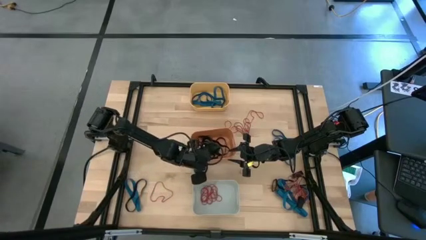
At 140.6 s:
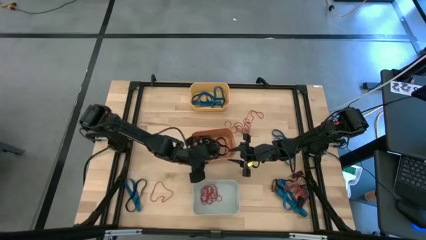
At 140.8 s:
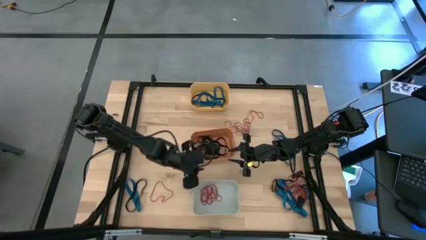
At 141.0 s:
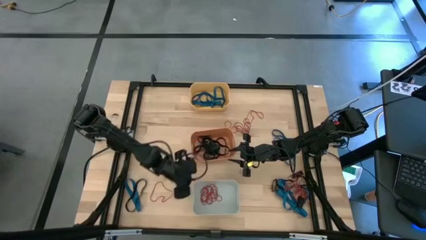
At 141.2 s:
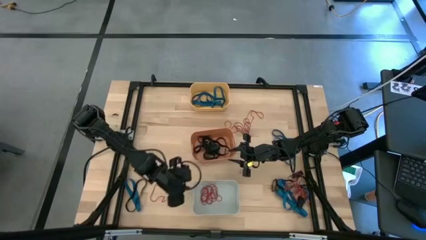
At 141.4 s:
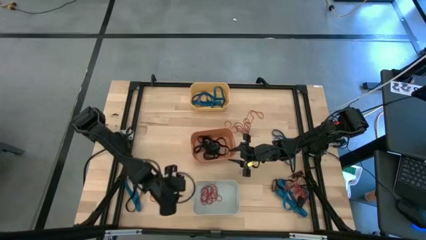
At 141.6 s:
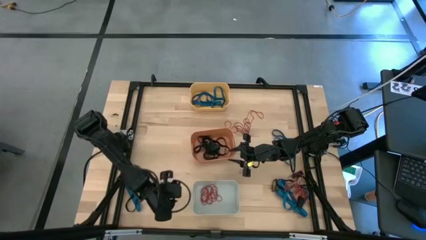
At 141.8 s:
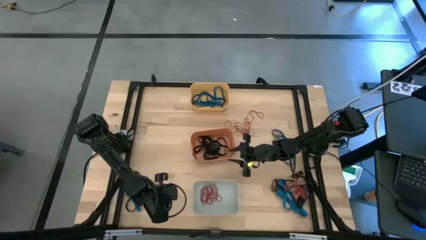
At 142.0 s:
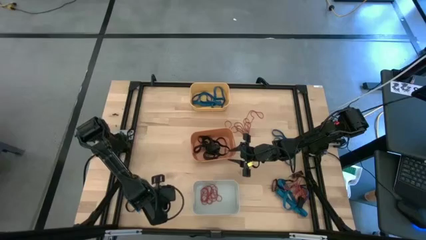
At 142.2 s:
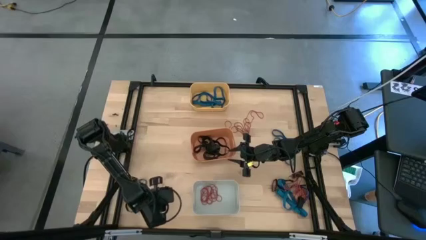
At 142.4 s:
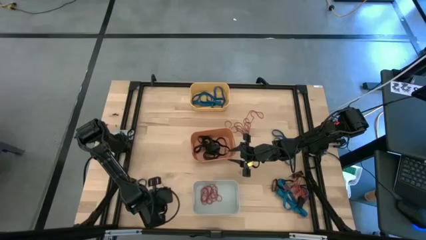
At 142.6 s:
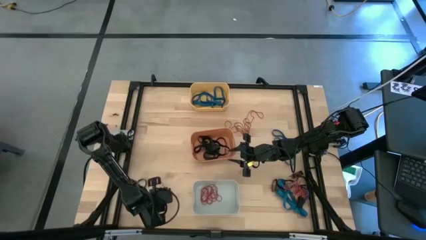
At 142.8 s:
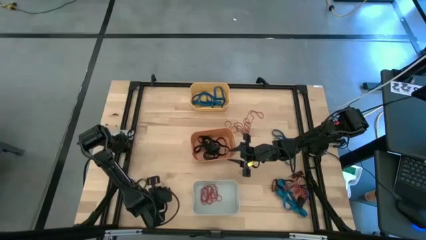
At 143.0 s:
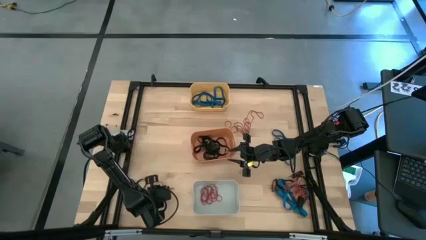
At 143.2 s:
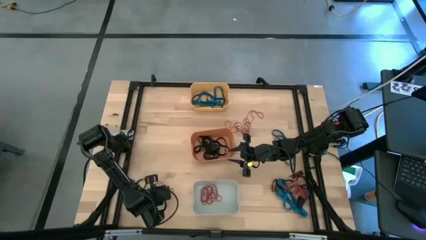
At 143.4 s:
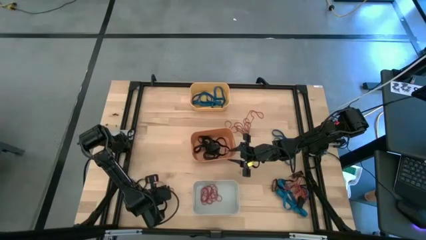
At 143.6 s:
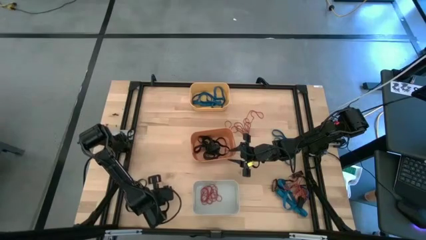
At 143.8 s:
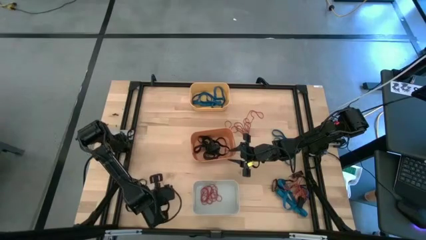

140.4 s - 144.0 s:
Task: Sort rubber bands into baskets
Put the red rubber band in the white bin

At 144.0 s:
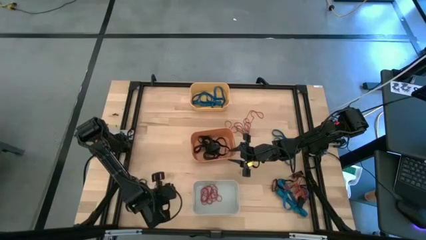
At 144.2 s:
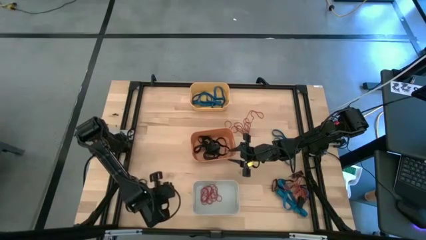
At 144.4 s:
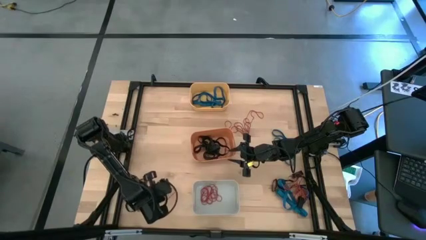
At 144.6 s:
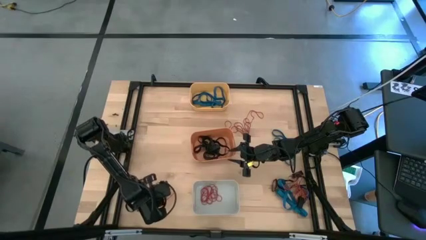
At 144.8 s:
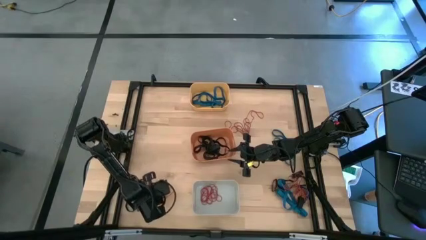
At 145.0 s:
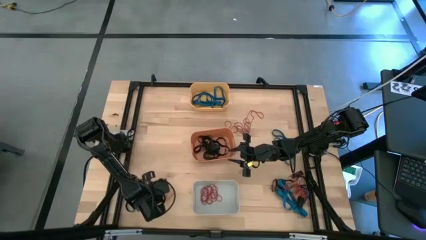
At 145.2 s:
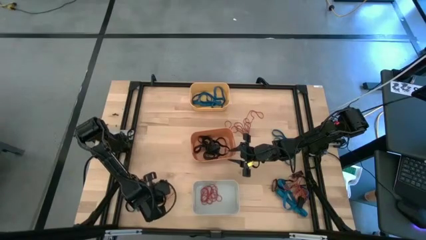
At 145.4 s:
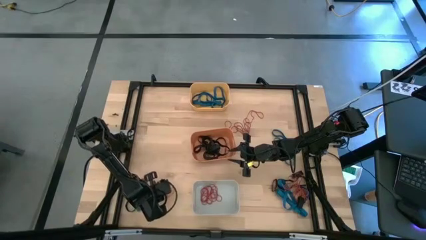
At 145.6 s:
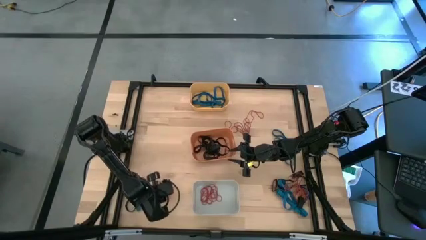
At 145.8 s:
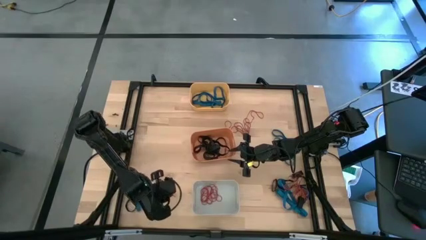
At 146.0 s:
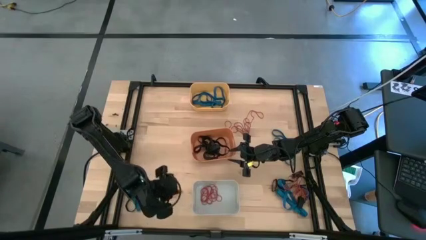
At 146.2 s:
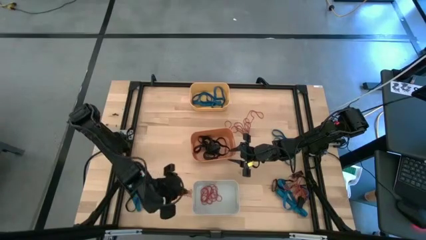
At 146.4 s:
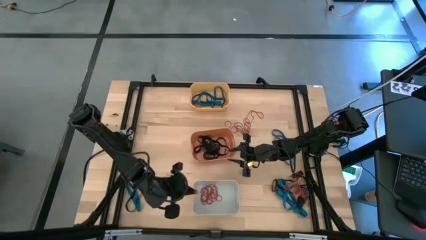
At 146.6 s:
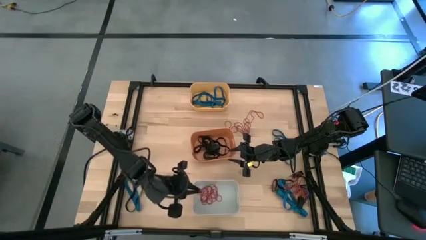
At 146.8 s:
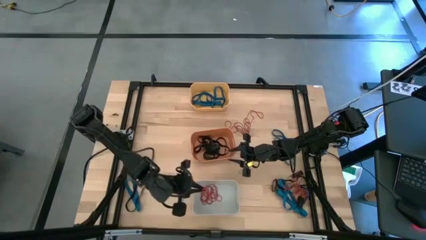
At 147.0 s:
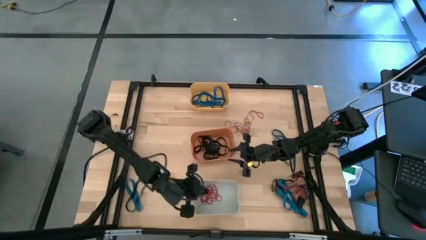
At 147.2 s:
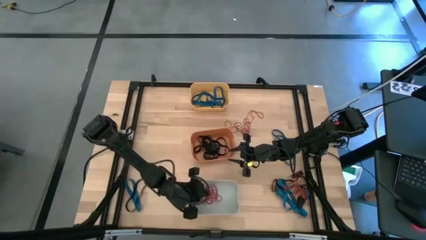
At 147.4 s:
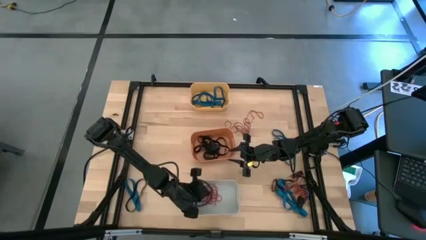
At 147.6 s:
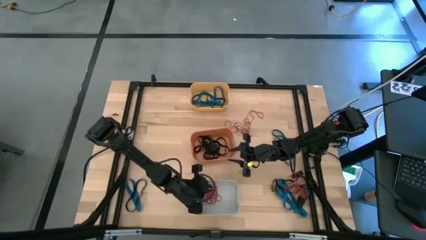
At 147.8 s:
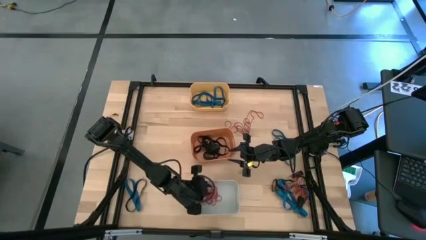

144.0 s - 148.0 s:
Put the red rubber band in the white bin

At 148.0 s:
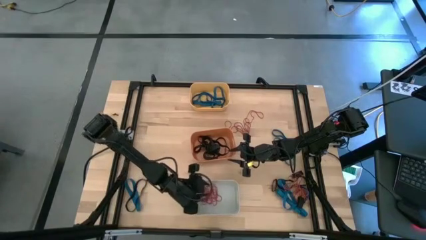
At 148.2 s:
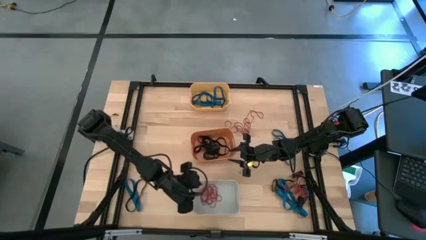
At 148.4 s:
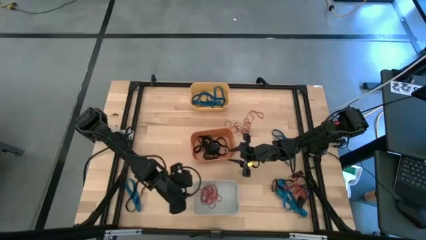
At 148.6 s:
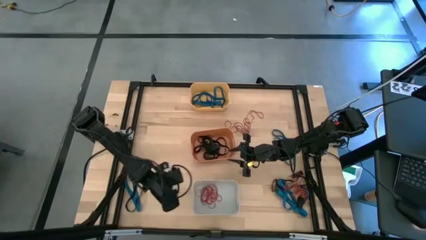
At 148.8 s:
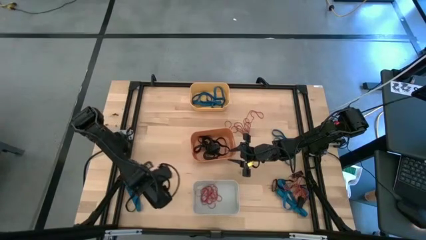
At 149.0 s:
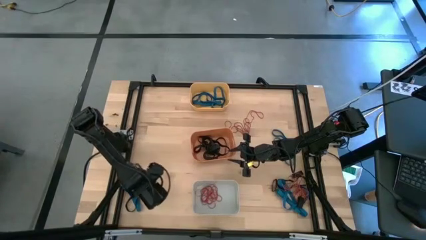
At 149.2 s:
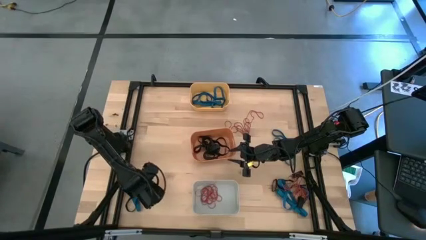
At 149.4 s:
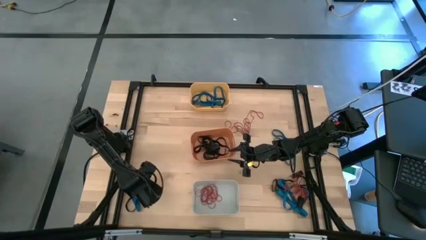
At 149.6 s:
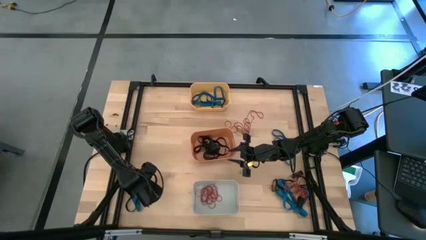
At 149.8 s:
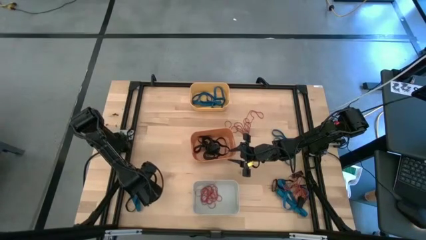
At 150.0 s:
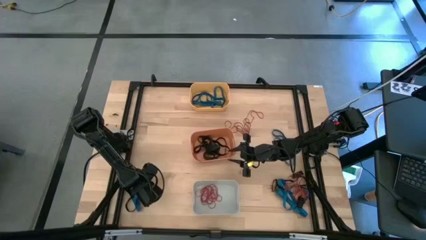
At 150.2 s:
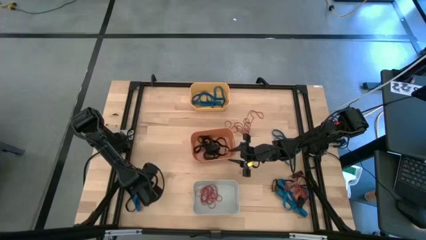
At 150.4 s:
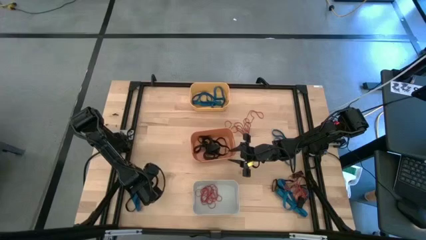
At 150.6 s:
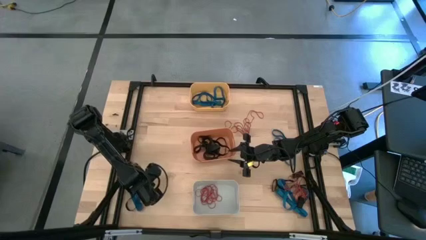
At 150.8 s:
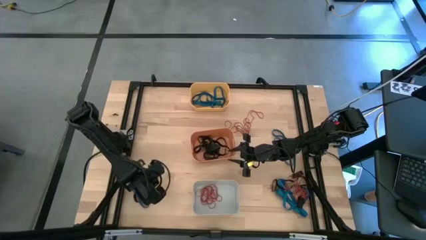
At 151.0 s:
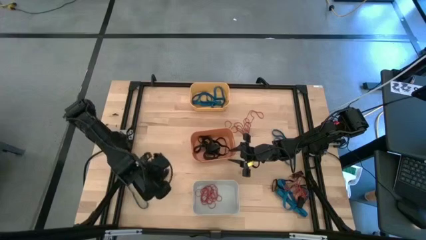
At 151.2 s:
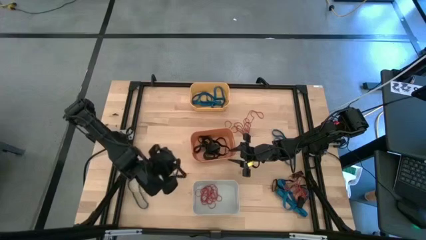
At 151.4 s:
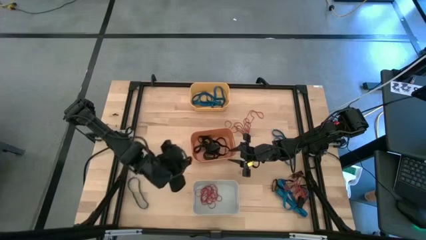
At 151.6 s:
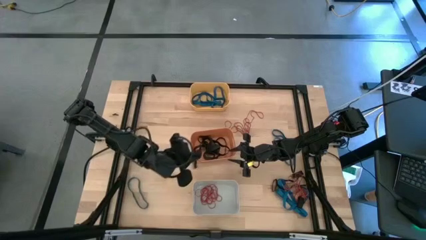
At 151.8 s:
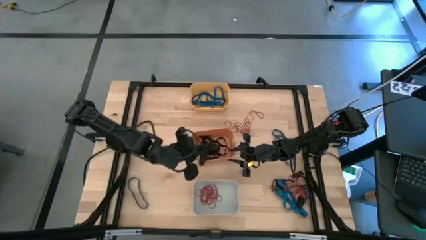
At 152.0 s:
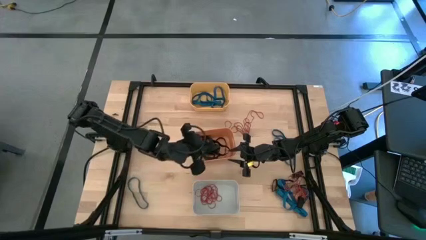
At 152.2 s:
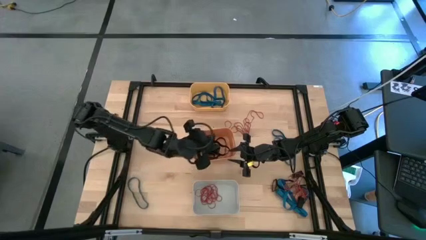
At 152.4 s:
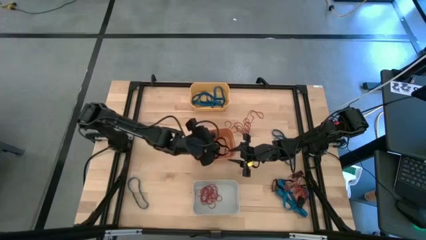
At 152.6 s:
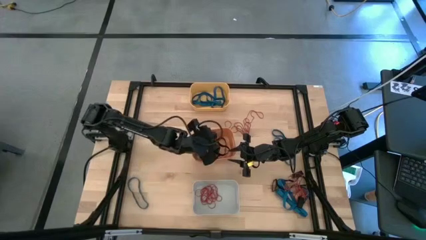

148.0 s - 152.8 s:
Put the black rubber band in the orange bin

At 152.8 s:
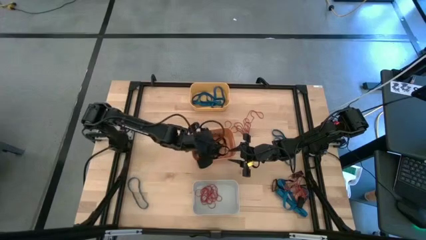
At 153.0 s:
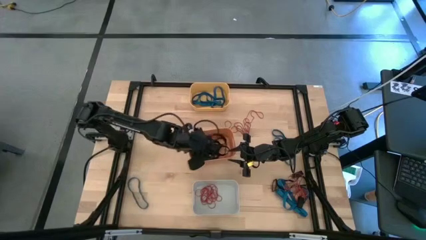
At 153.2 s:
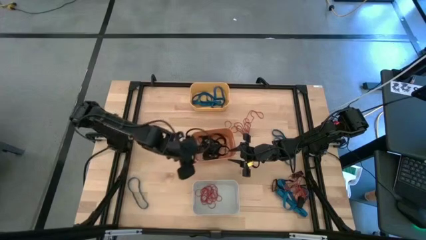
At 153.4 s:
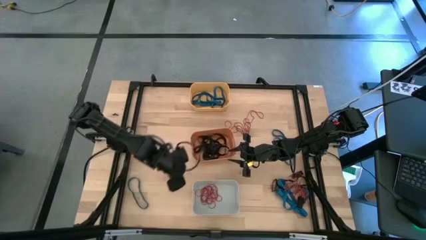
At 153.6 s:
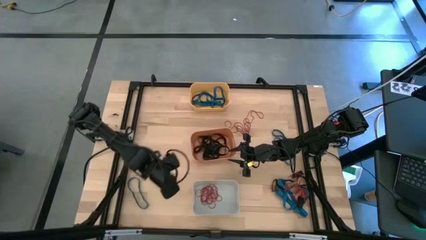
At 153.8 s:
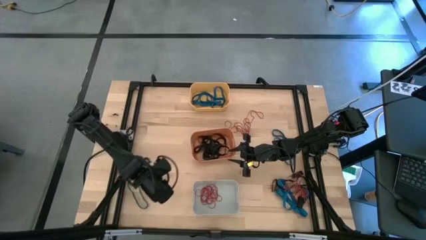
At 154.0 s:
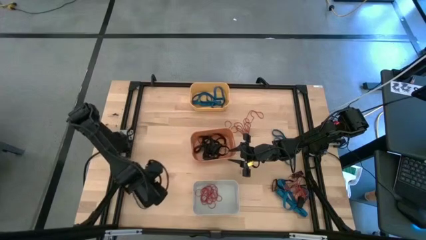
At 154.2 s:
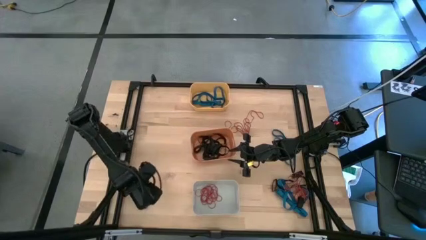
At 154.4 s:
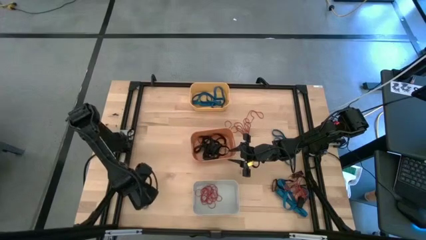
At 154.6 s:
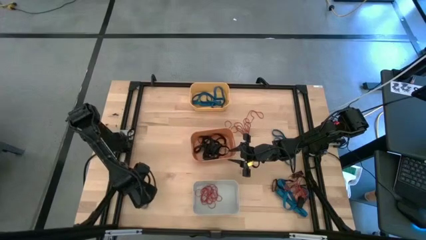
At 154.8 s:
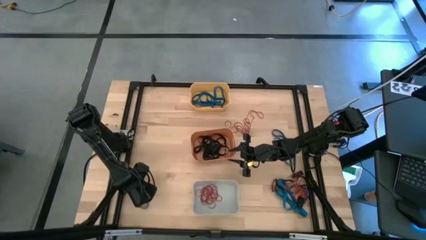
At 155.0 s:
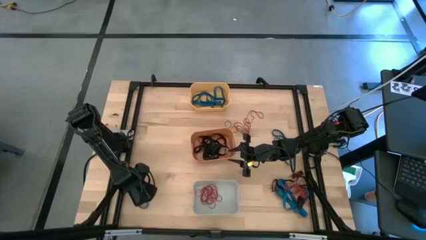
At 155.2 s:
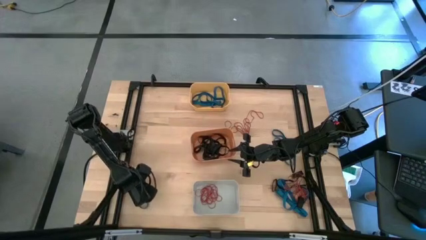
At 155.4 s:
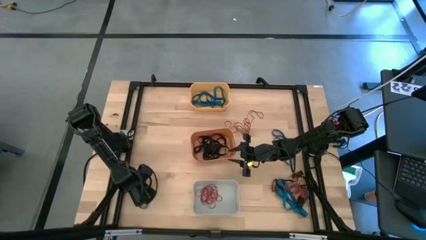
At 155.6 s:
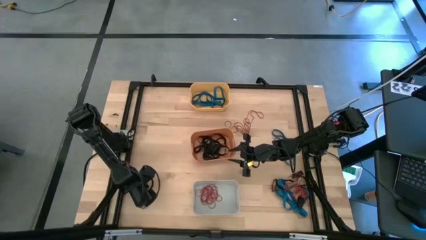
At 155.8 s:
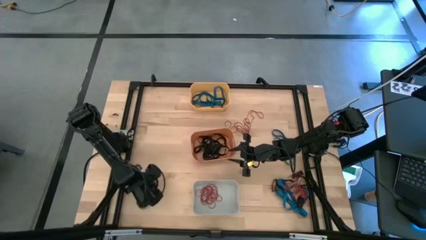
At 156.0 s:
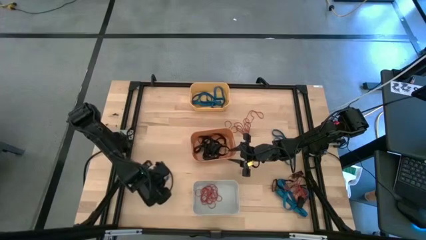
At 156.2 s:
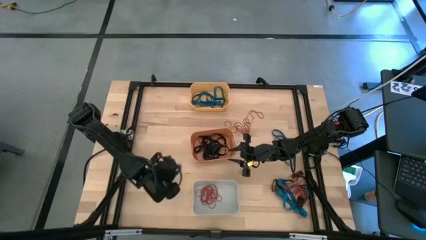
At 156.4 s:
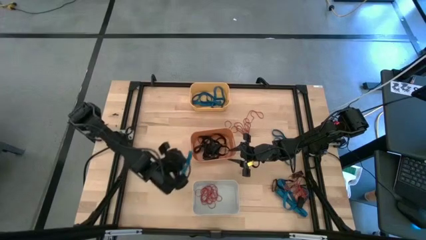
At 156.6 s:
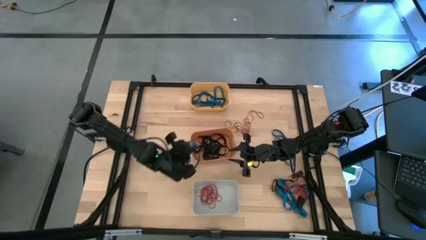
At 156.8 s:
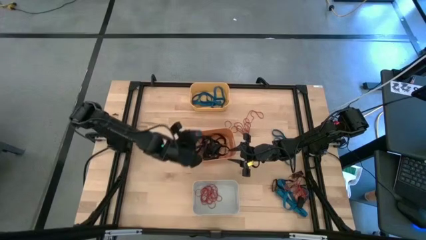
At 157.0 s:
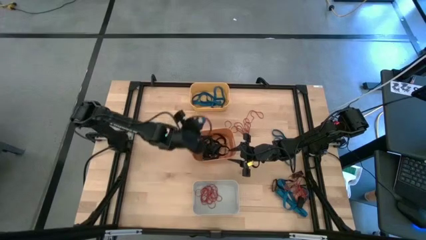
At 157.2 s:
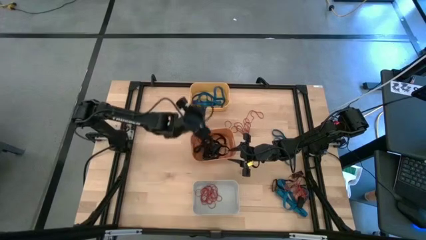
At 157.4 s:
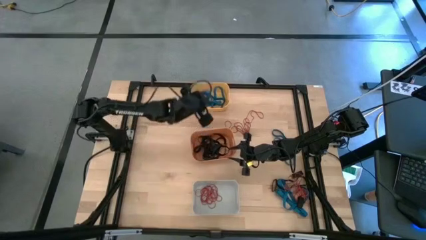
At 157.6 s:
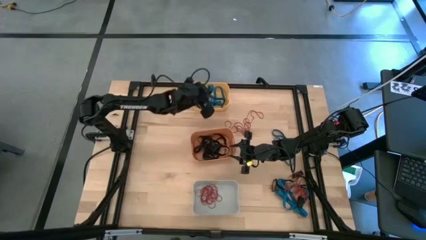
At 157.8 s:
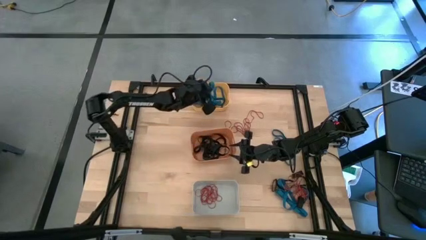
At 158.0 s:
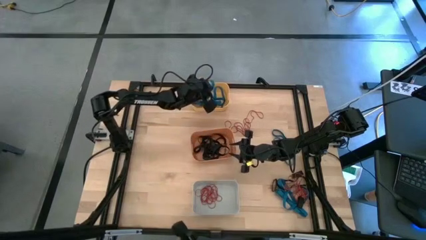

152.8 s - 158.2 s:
Put the blue rubber band in the yellow bin
